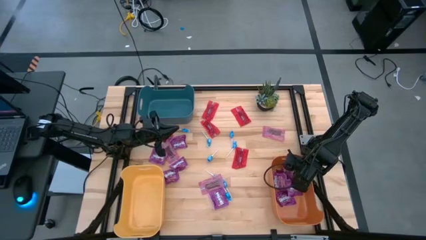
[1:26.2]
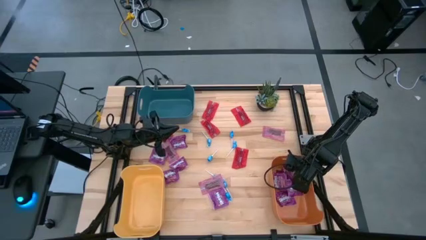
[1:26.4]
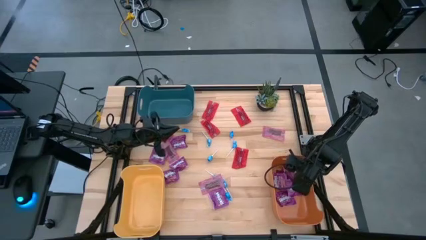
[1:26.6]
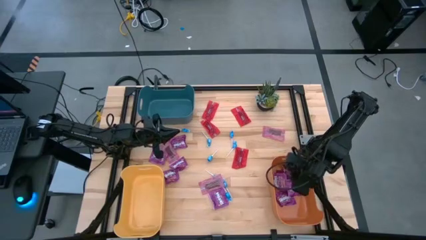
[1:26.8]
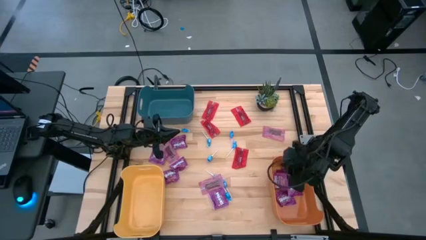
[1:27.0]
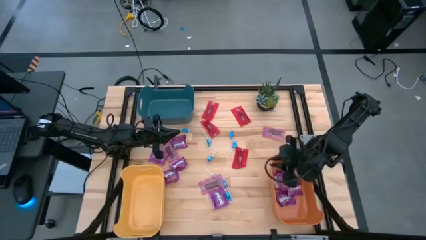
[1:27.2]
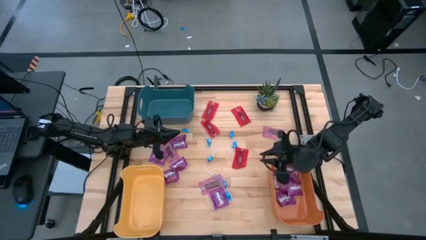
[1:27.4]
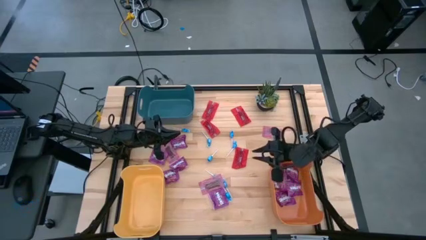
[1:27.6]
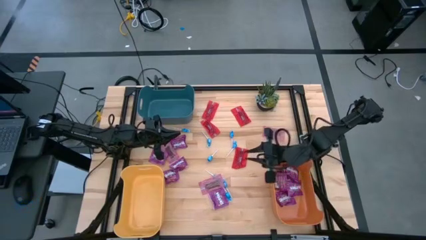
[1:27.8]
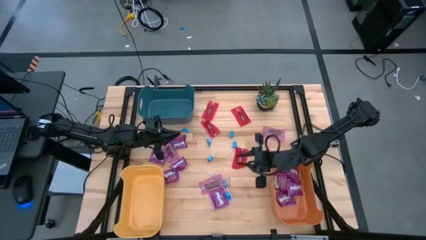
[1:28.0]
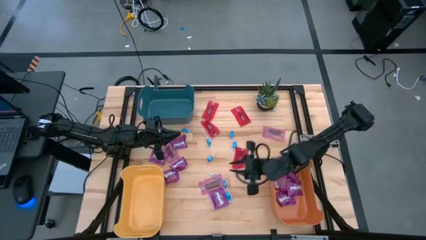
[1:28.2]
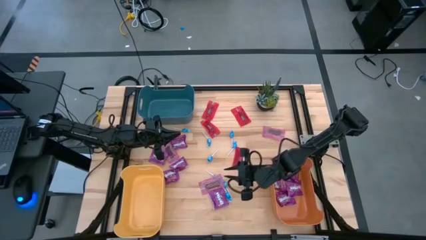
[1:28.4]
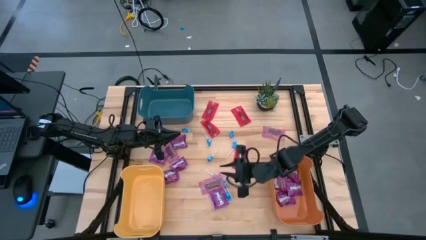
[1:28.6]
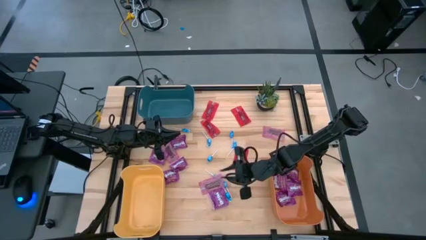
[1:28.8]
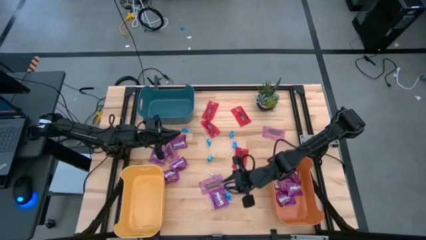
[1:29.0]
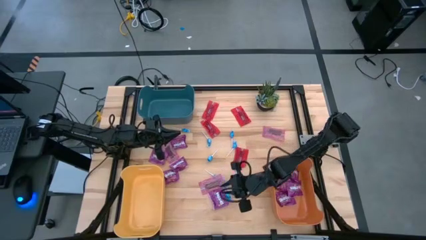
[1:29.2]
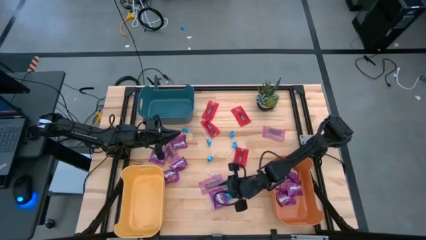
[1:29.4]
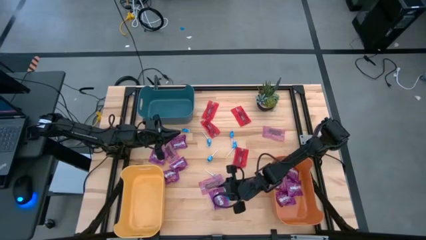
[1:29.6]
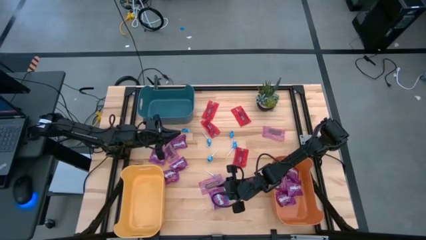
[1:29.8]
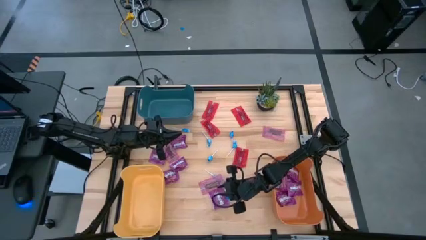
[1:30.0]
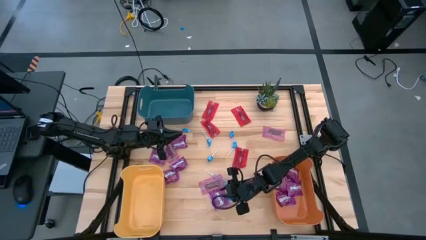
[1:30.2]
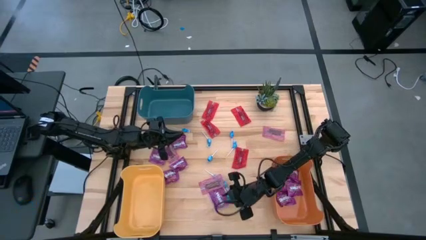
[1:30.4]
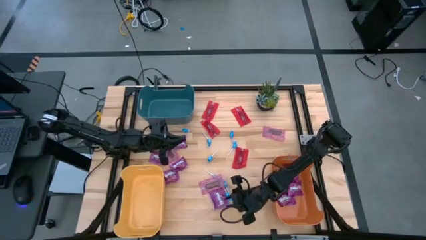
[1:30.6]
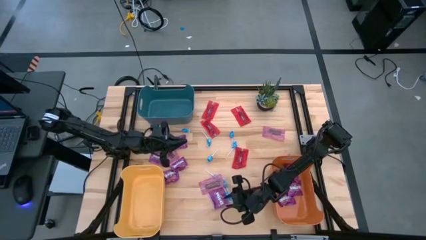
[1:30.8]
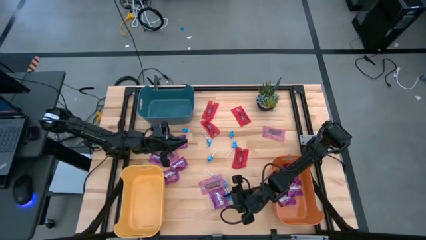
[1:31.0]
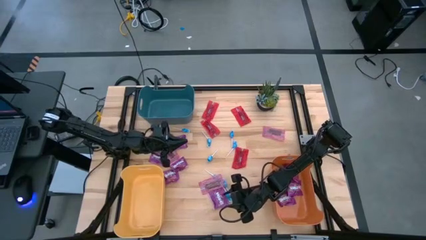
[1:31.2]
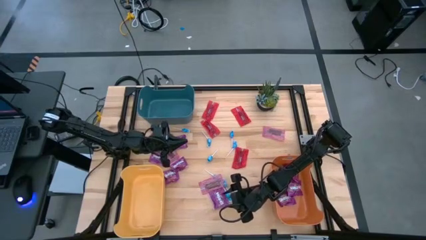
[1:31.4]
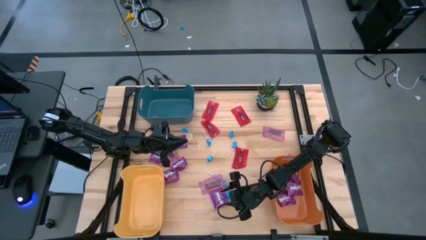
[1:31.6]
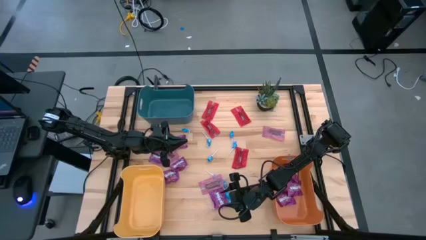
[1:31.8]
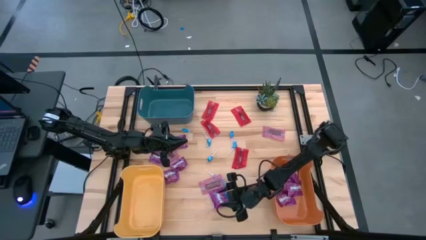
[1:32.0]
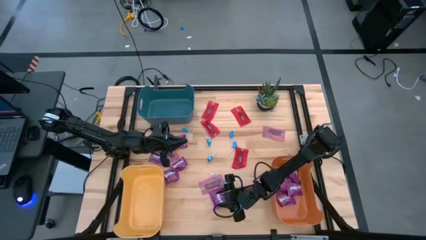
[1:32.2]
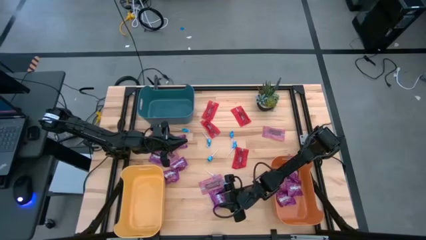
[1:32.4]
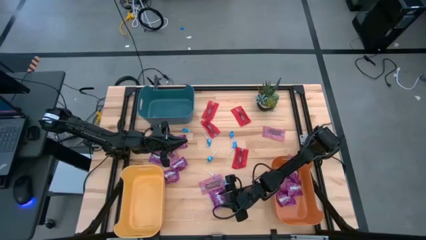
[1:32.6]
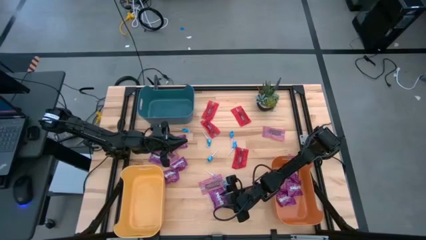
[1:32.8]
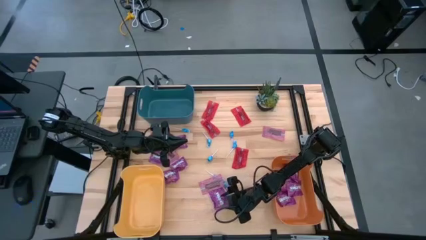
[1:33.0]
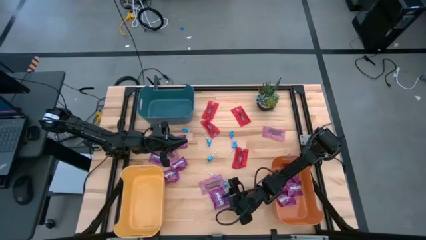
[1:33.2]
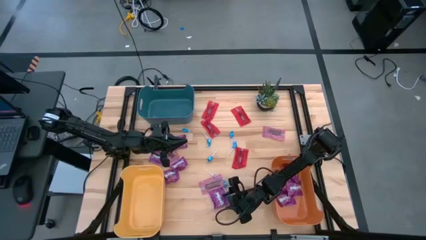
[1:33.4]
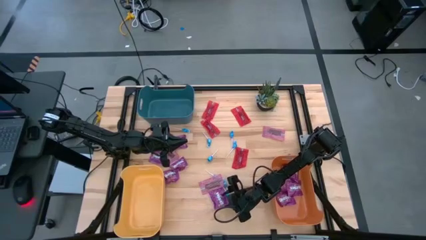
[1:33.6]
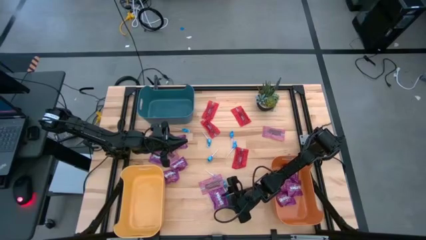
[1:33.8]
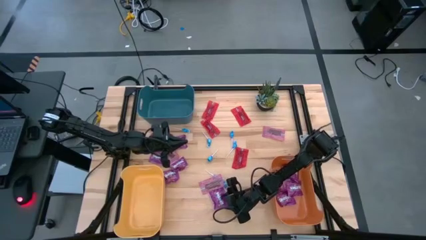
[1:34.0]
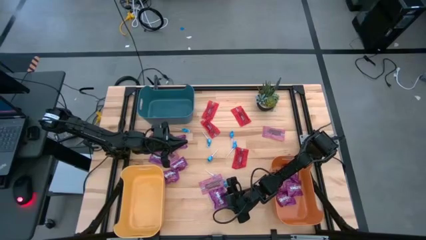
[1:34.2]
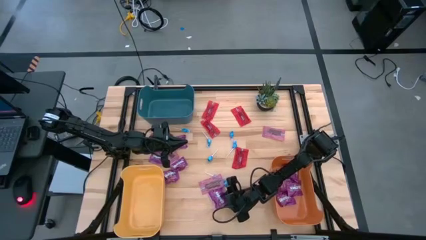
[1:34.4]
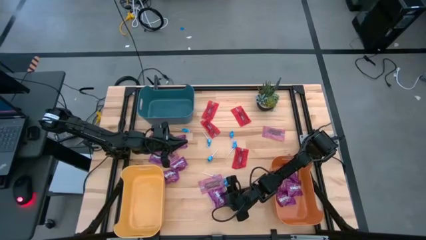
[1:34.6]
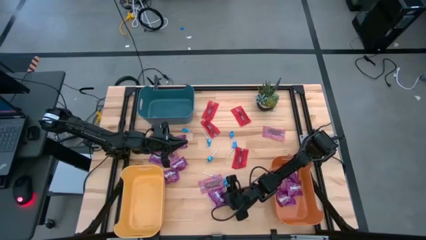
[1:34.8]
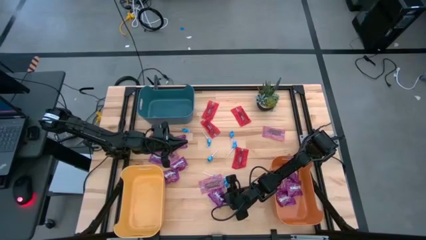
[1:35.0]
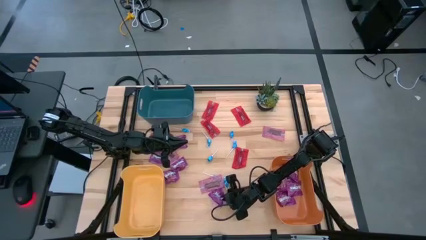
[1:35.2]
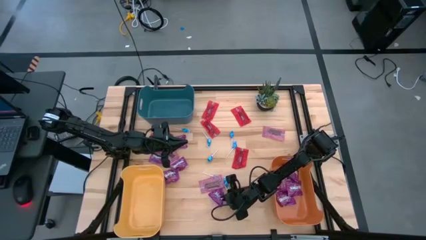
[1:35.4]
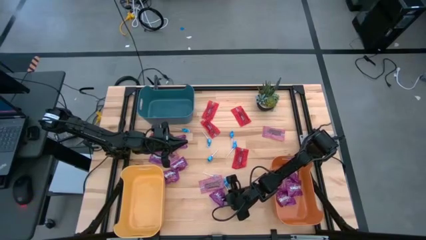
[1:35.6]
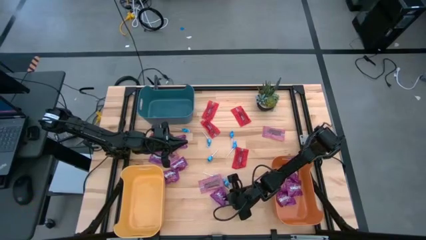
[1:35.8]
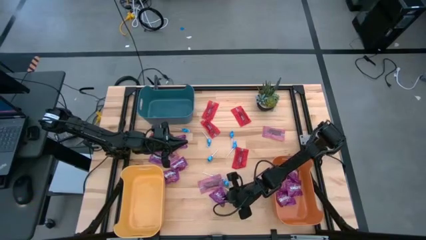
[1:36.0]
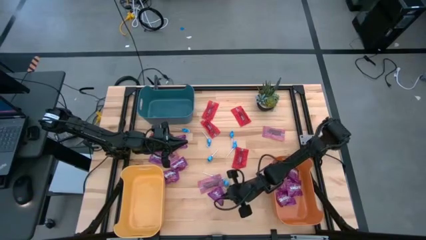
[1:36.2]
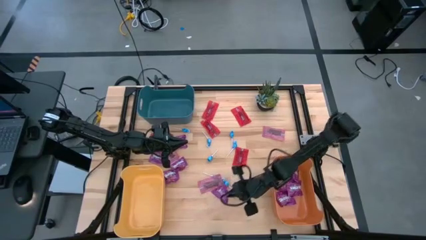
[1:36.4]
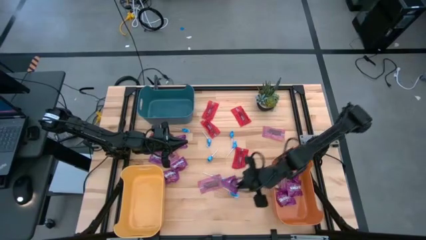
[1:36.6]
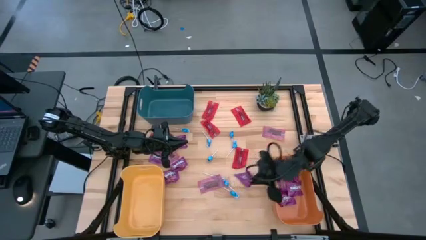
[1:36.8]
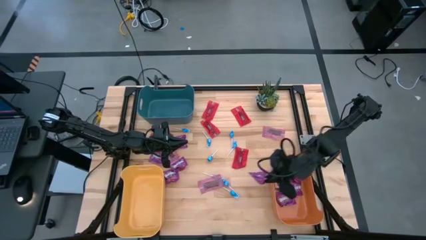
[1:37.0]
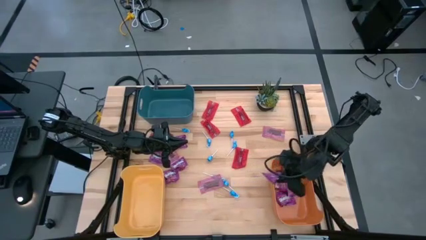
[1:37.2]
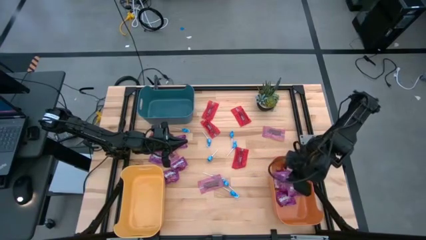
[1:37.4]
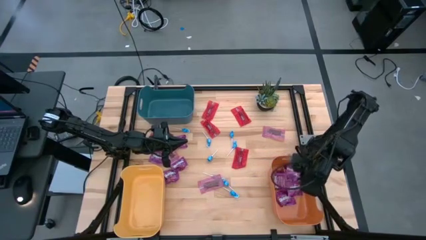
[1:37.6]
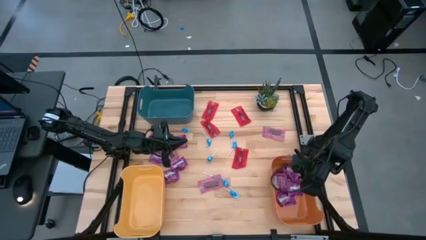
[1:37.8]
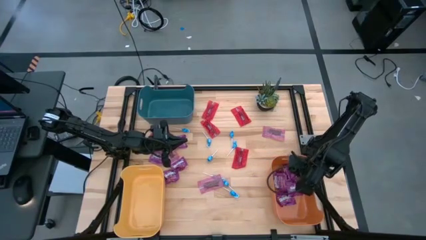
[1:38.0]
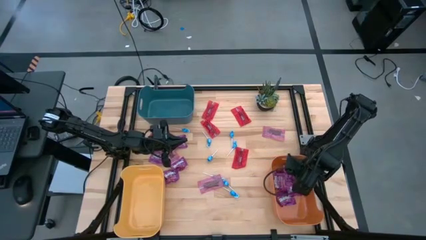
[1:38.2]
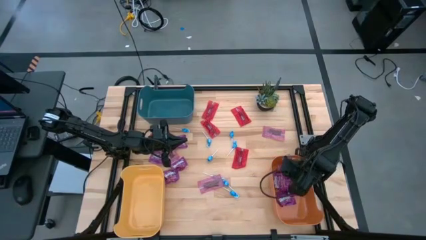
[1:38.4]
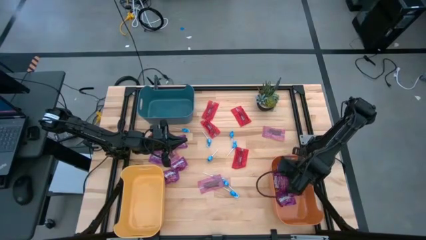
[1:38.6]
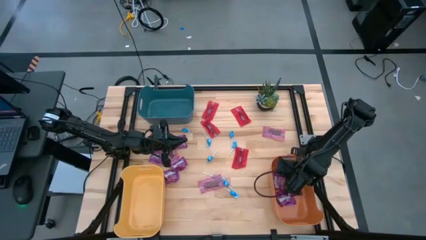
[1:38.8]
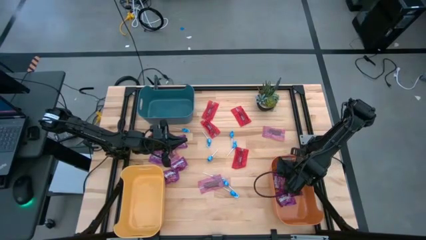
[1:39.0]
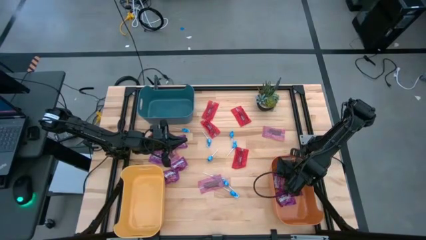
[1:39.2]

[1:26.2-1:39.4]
Task: Sort candy
Put the purple candy into the orange bin

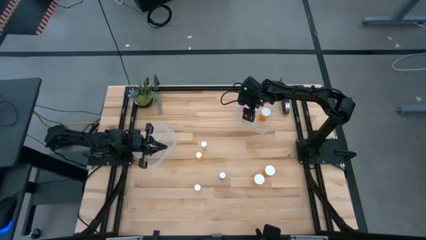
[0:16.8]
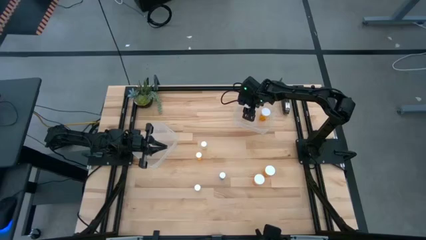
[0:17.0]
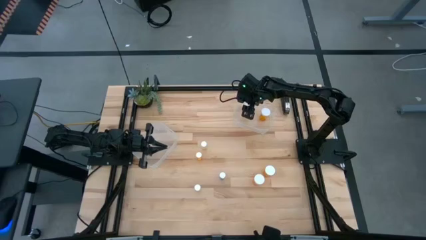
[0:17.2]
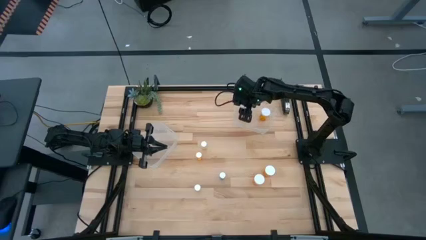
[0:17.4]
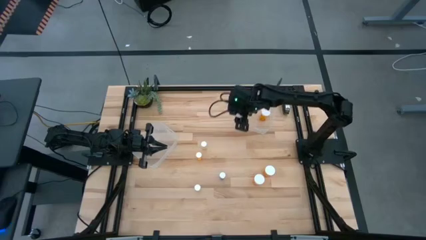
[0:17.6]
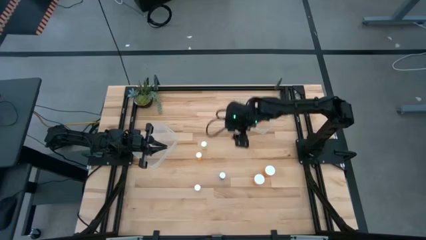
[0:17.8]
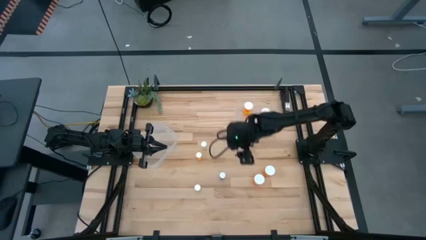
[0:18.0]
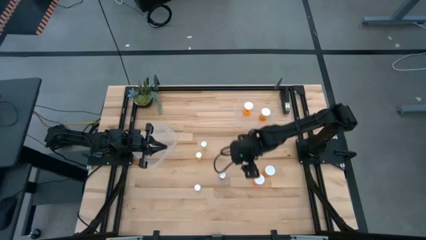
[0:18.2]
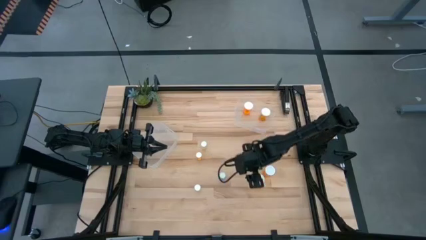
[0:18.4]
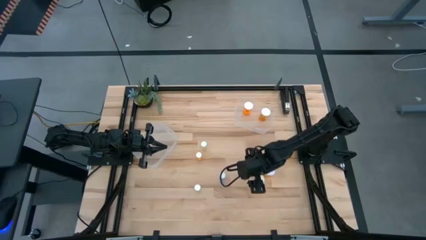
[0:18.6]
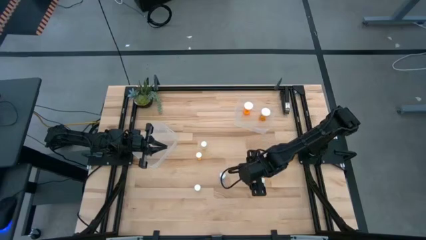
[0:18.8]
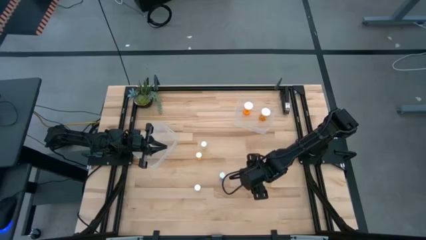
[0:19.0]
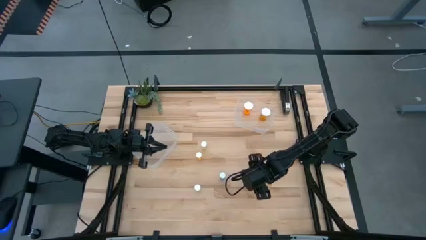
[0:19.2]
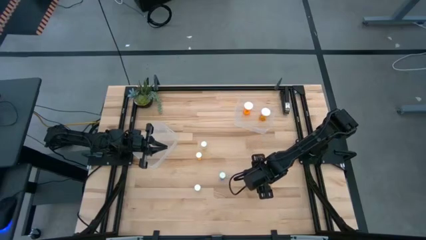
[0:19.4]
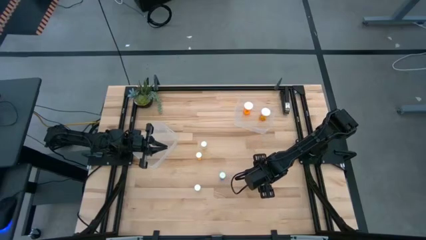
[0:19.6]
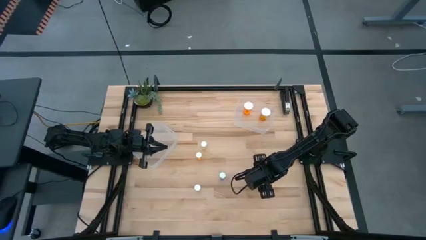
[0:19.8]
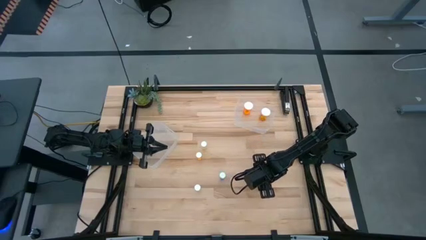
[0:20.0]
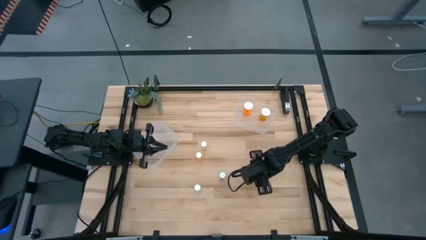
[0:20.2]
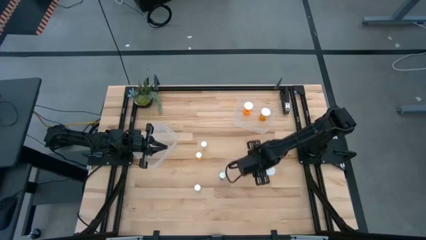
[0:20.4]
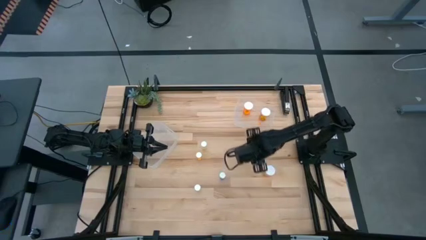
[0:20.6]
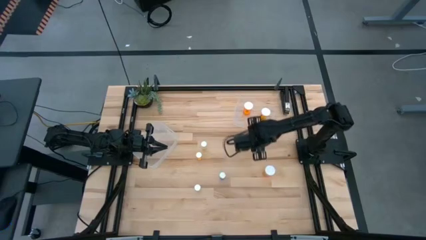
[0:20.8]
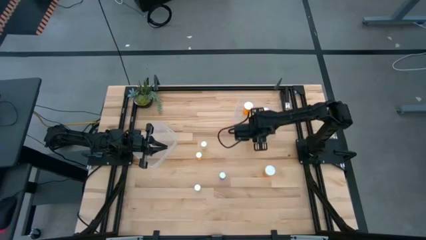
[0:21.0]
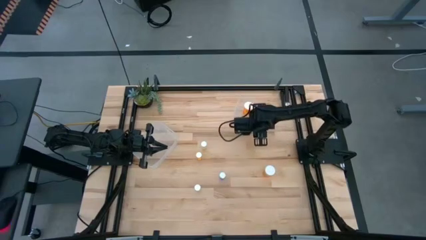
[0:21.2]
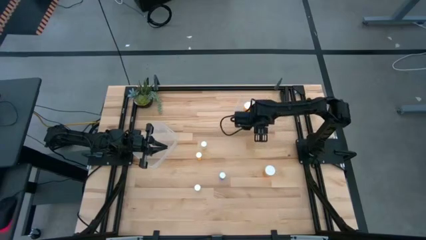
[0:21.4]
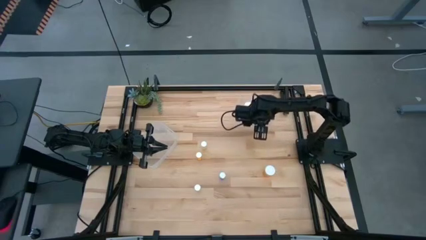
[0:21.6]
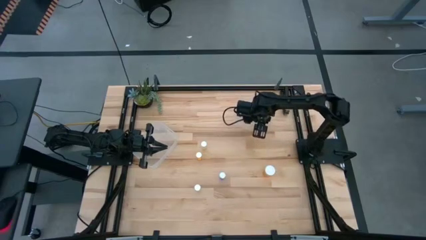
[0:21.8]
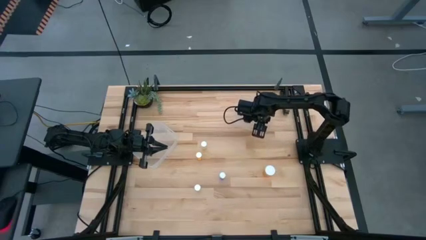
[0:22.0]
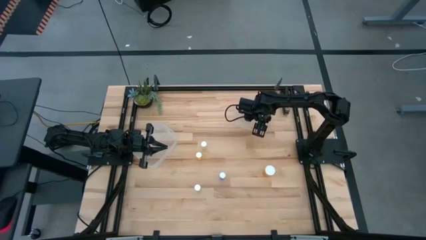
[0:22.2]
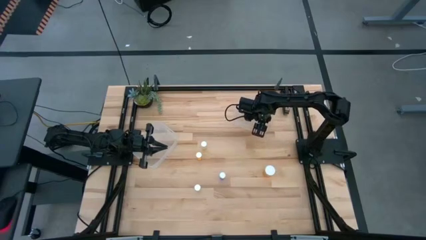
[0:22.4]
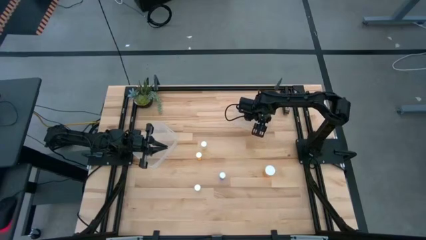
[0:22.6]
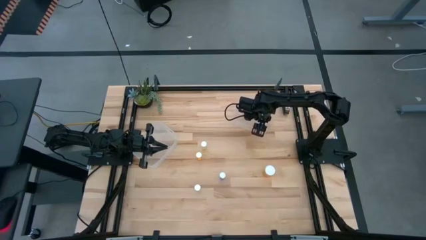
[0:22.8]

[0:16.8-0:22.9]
Task: Pick and place medicine bottles into bin by pill shape (circle, oval)
Put the big orange pill bottle into the right transparent bin
